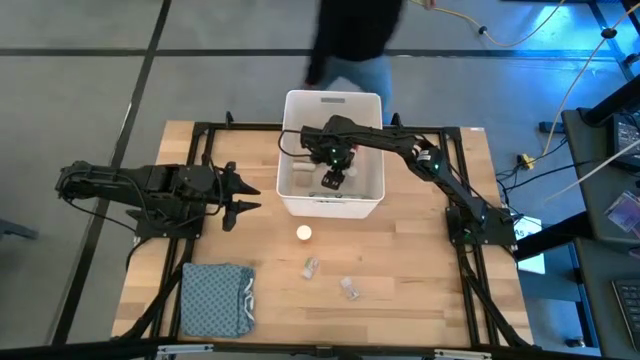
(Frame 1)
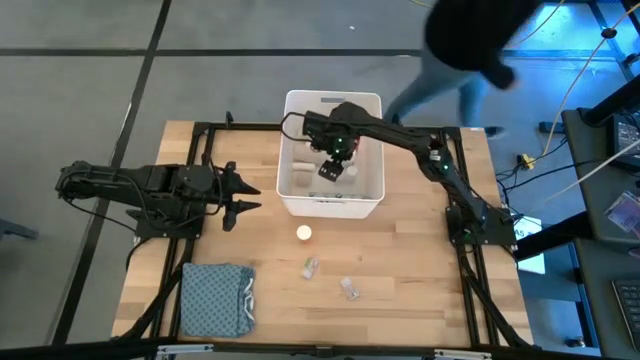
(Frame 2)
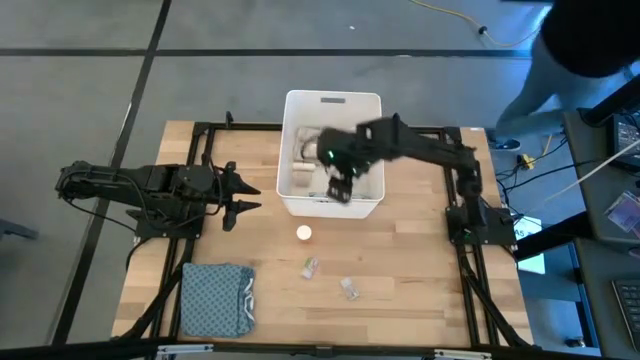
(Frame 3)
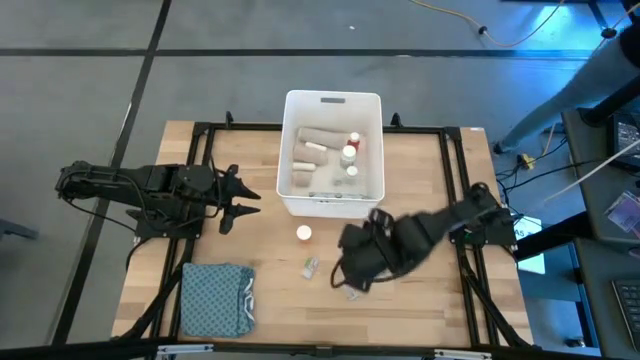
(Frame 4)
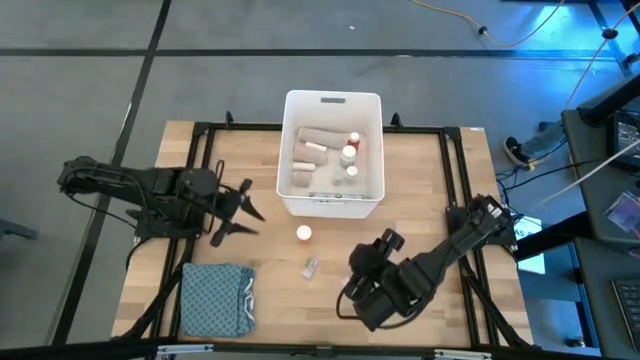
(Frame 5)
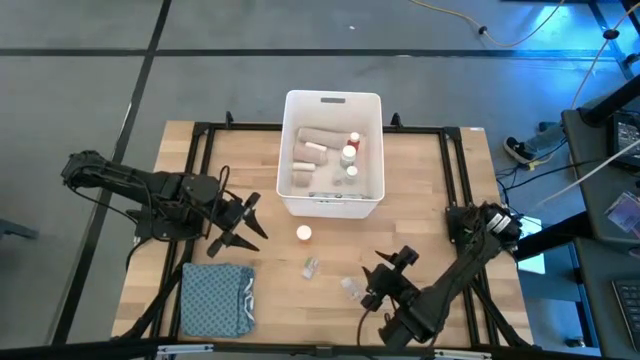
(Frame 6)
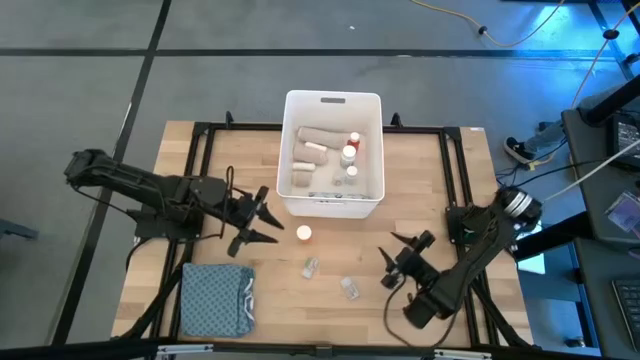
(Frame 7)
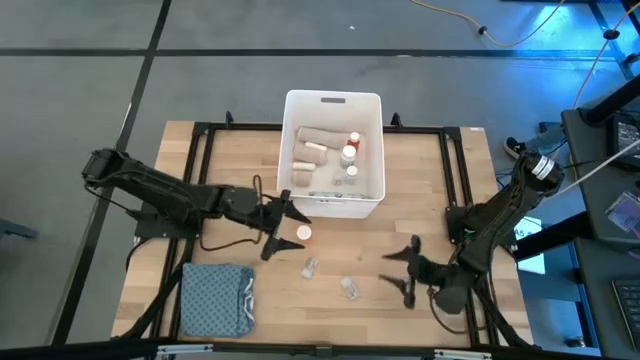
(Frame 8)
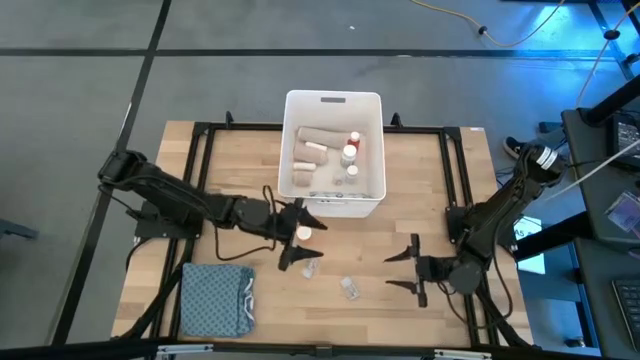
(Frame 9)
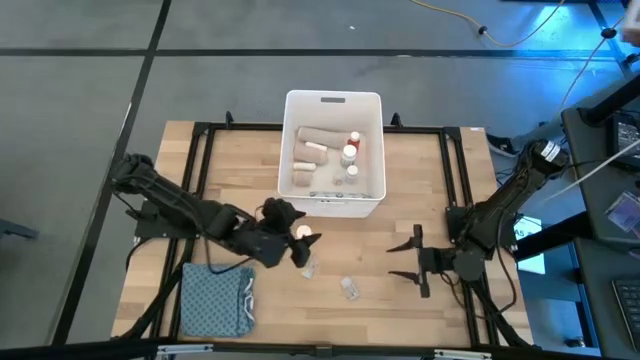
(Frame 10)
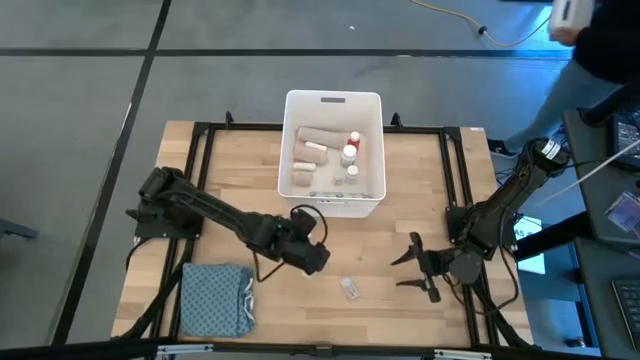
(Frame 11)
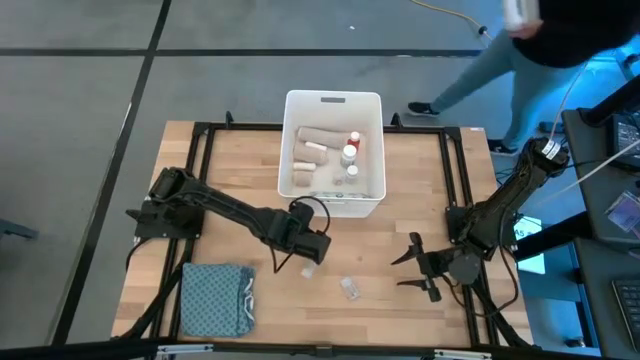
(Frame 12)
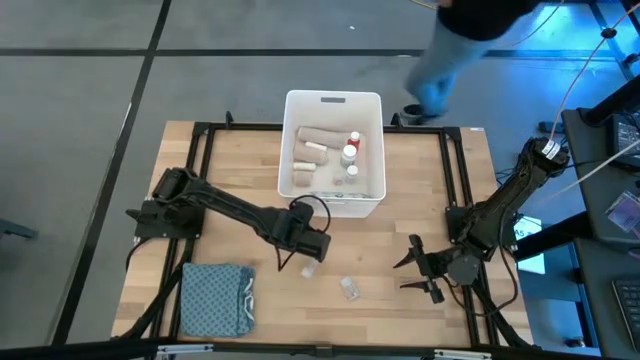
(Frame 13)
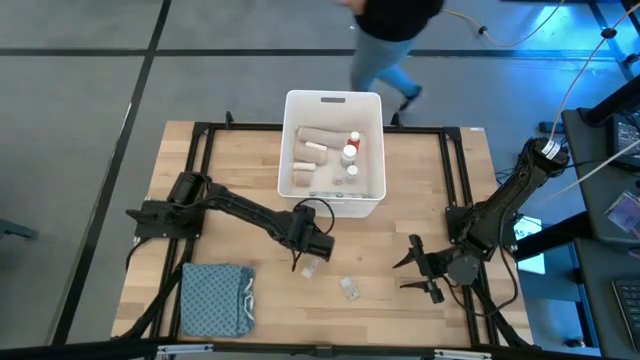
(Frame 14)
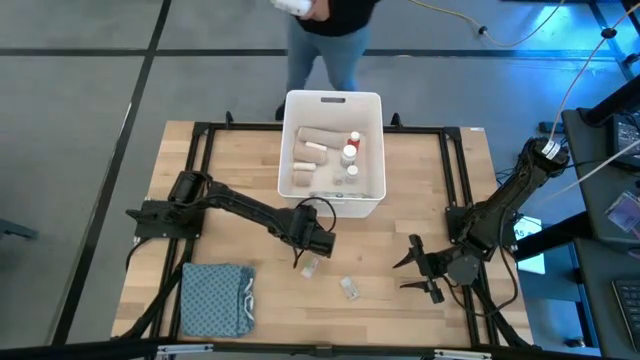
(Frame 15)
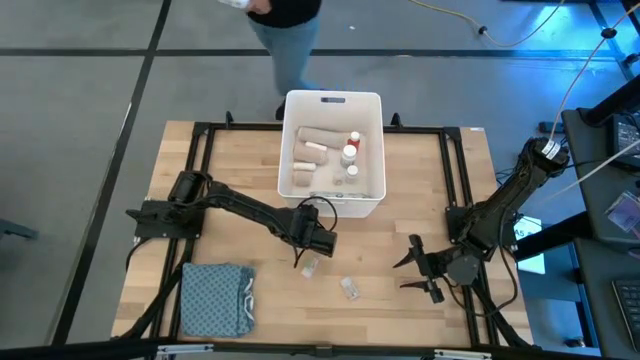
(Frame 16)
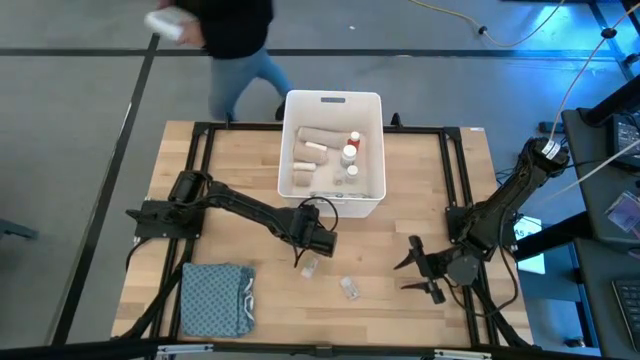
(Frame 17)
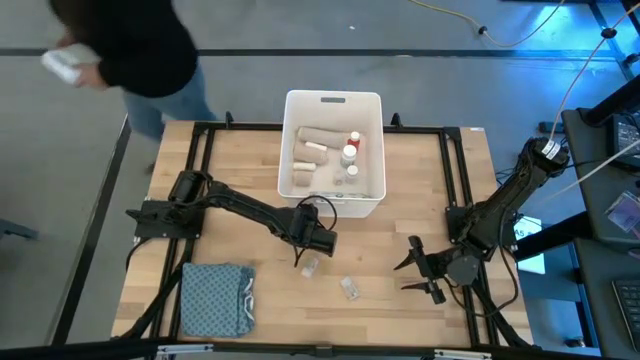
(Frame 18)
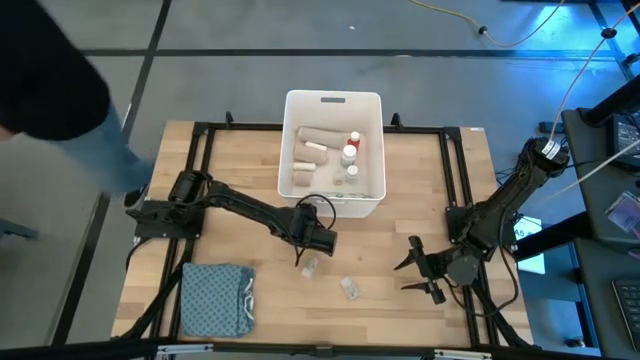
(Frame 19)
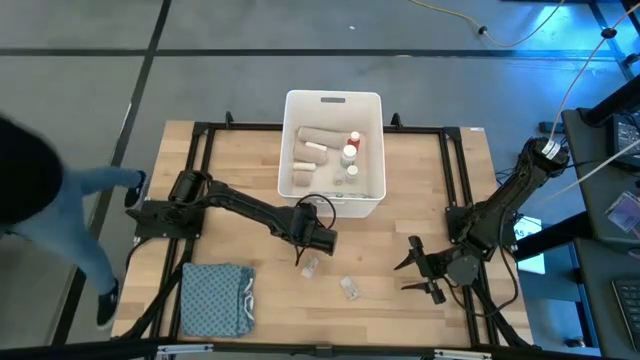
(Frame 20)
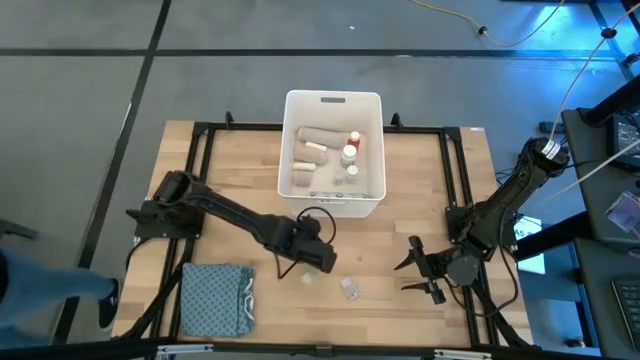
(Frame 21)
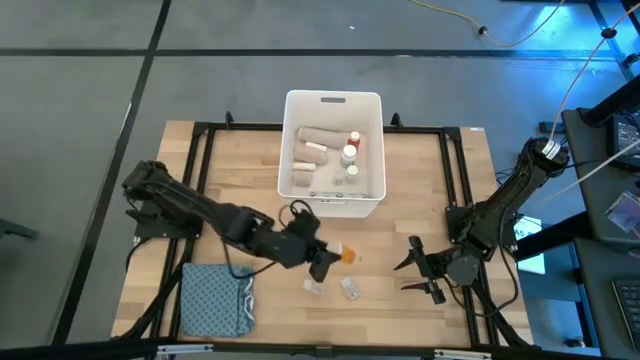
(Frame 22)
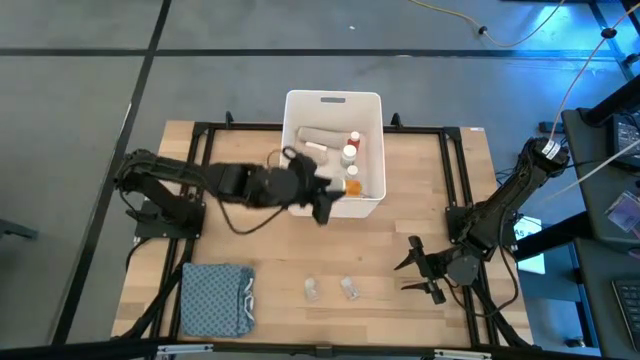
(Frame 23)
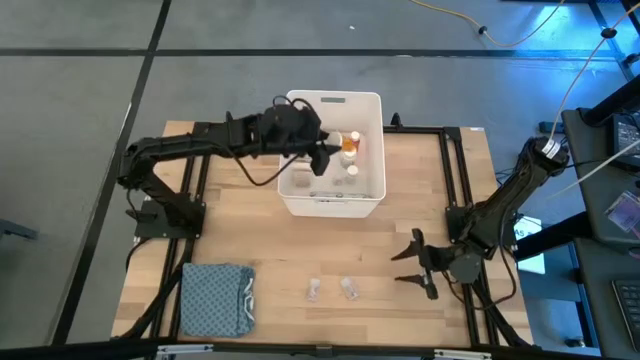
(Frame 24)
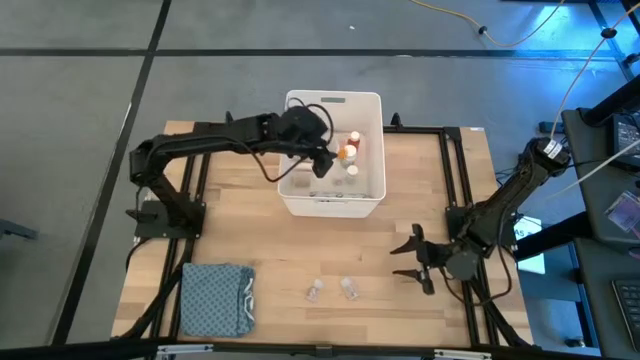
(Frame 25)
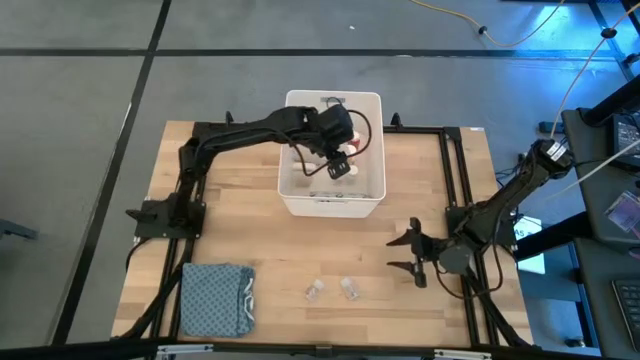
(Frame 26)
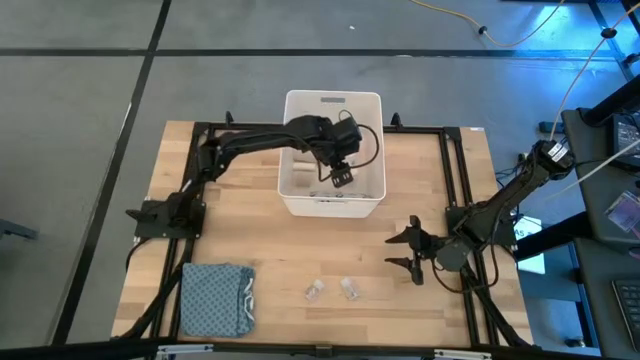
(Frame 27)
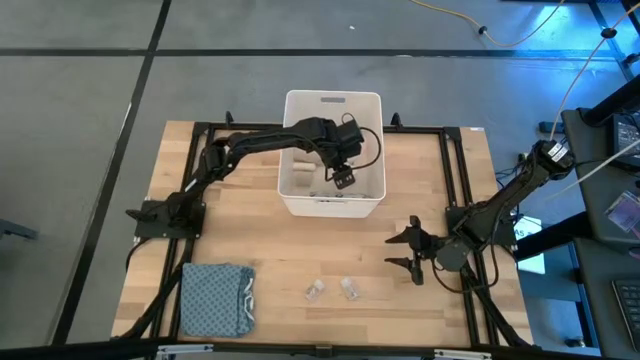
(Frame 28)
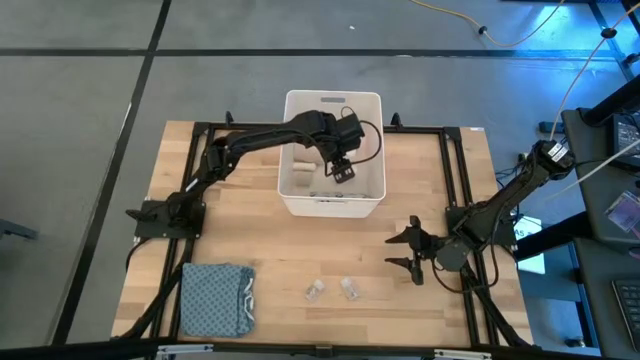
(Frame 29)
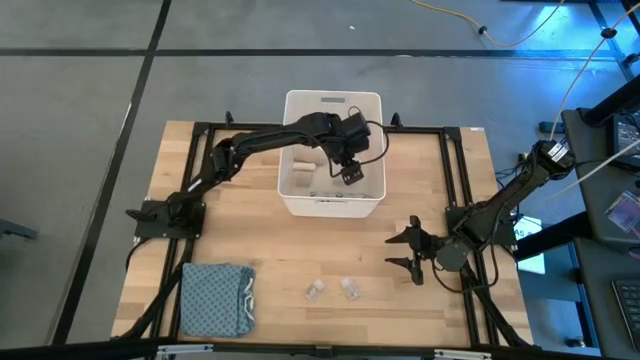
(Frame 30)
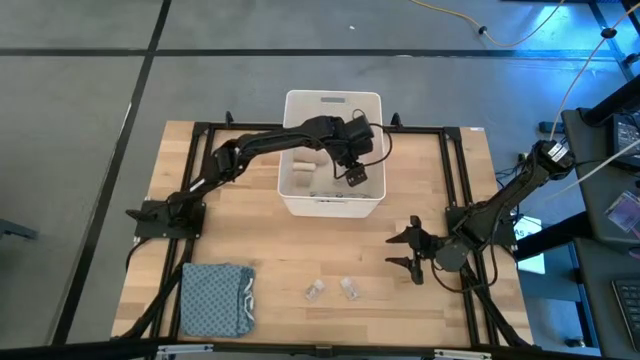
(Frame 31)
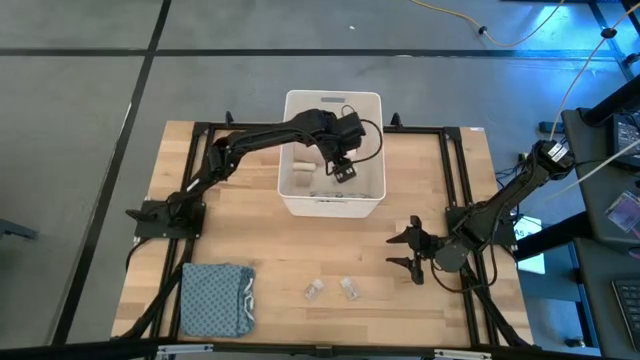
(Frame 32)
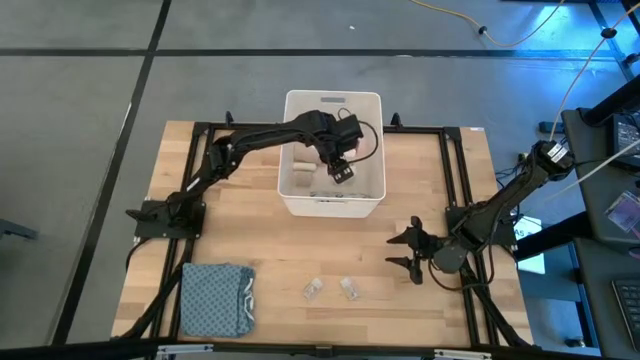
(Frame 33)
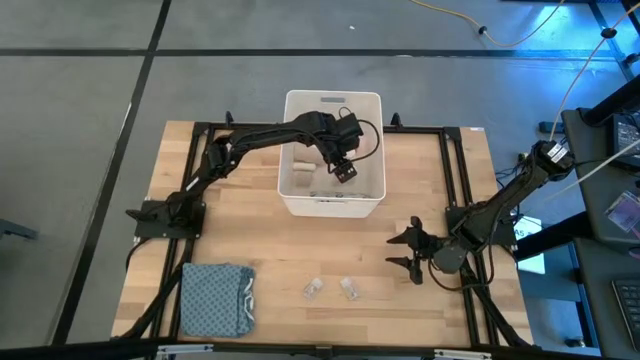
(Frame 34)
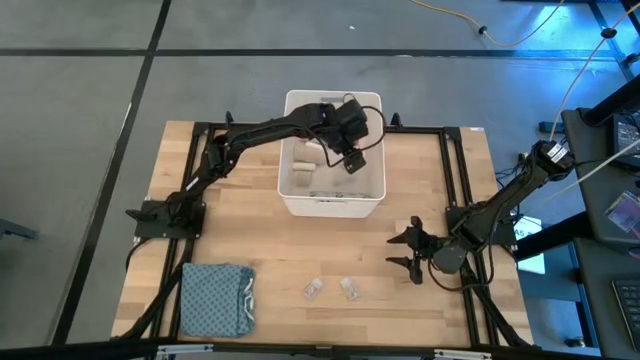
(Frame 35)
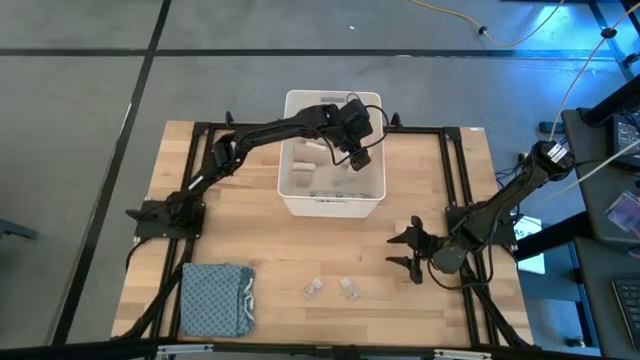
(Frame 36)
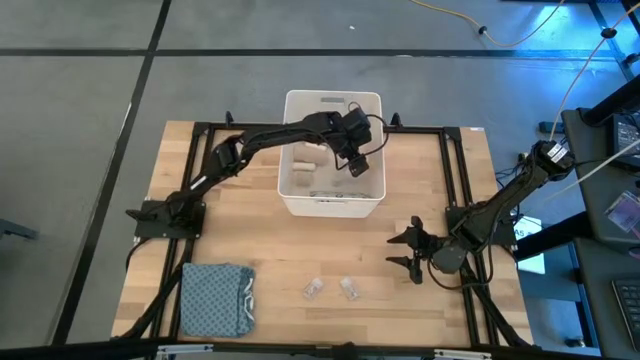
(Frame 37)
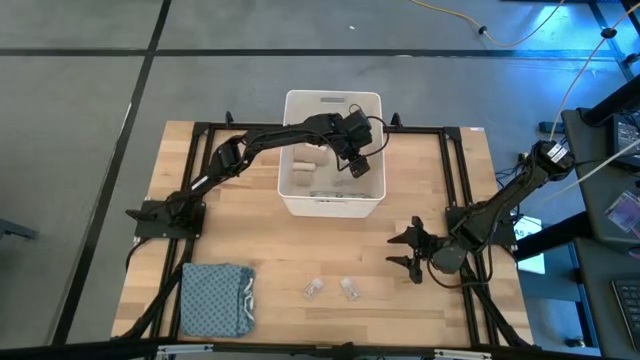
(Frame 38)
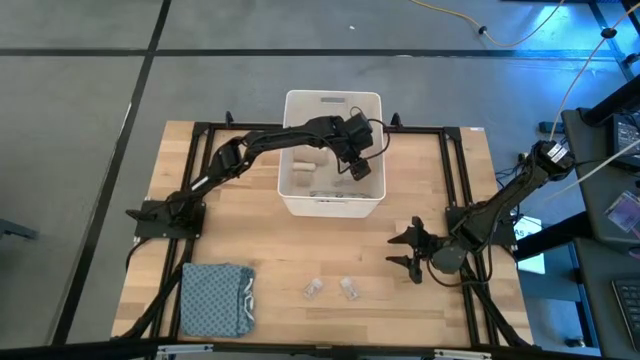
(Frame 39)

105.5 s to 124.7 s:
Task: Pick & place medical supplies in basket/bin
Put the orange pill bottle into the white bin

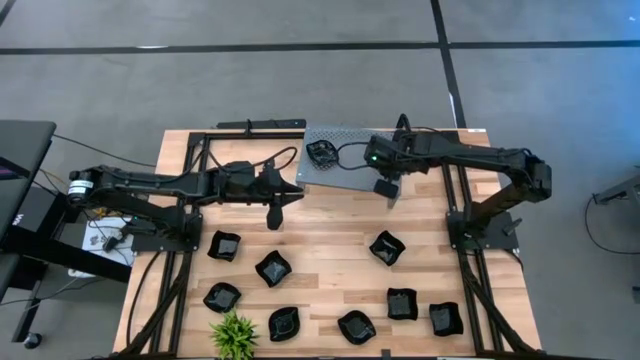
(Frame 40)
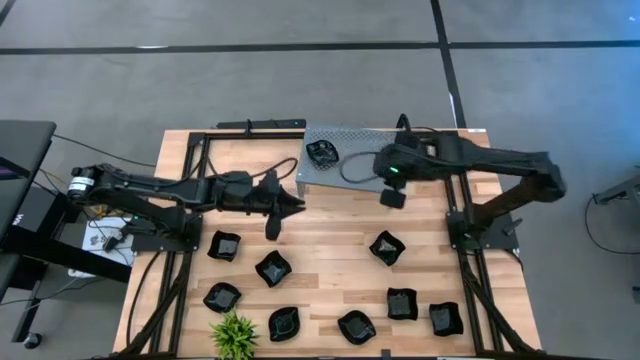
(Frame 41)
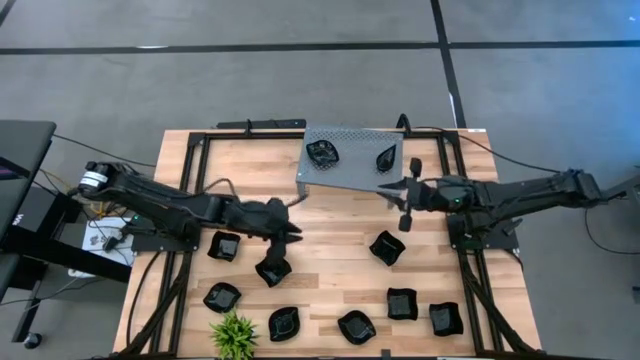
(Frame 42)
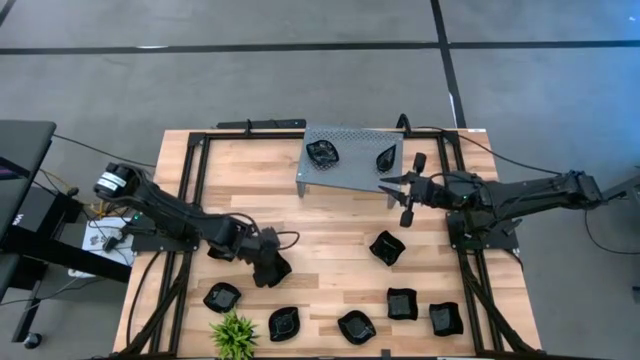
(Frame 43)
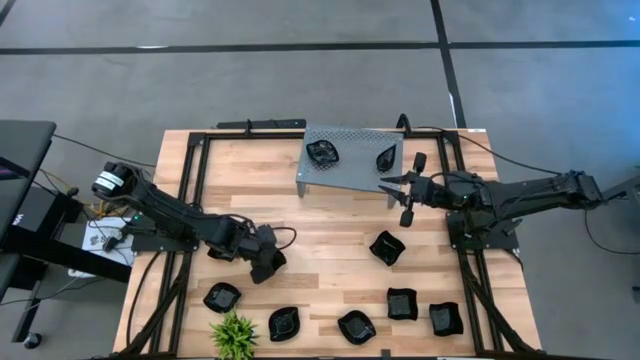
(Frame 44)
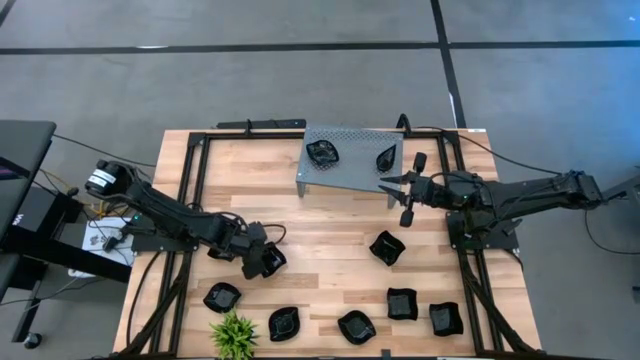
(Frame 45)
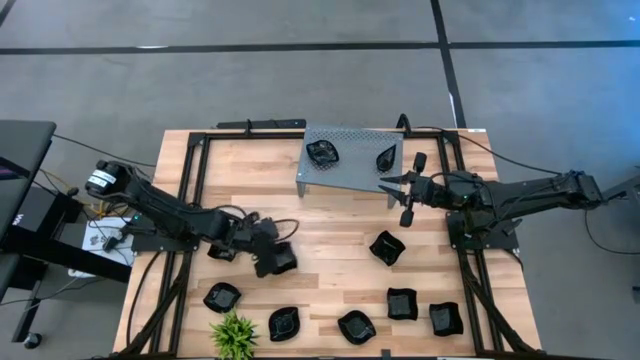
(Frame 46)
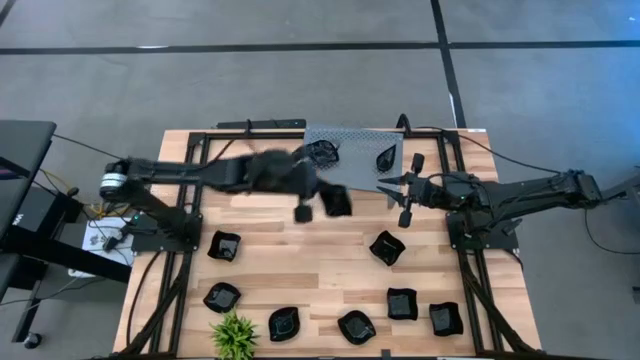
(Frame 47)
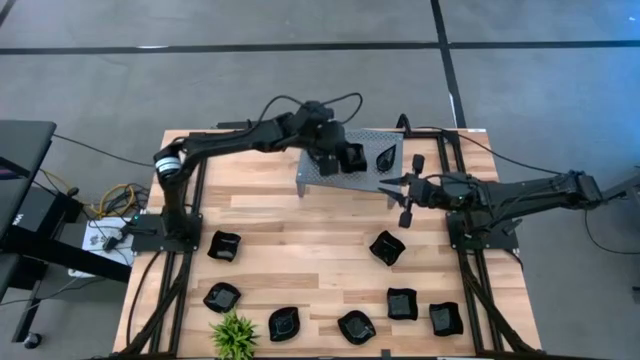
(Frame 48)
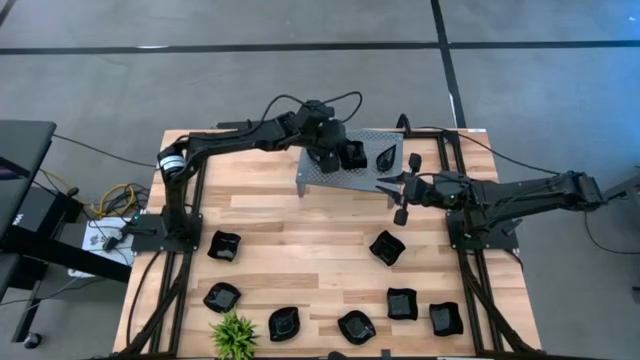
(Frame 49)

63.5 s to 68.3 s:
Task: Pick & Place Mini shaped plates
Put the distorted square plate on the shelf
